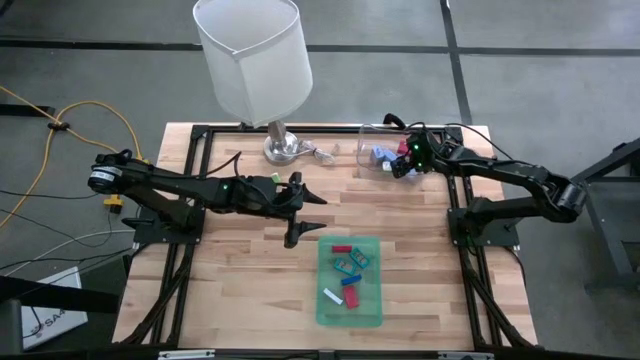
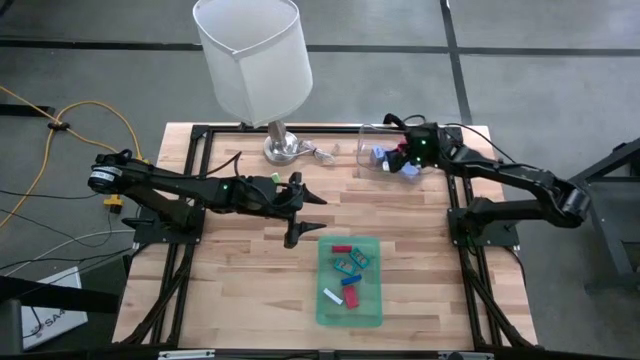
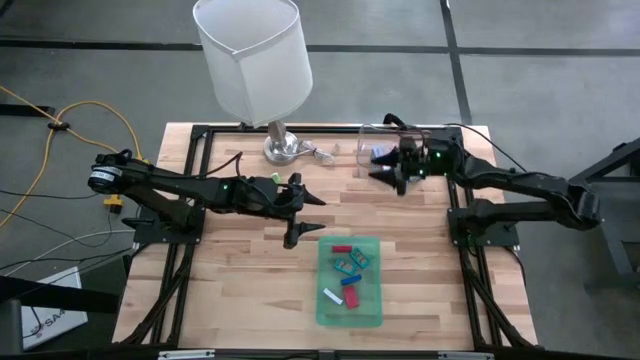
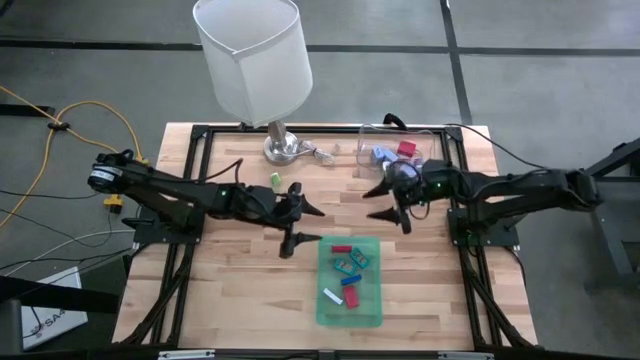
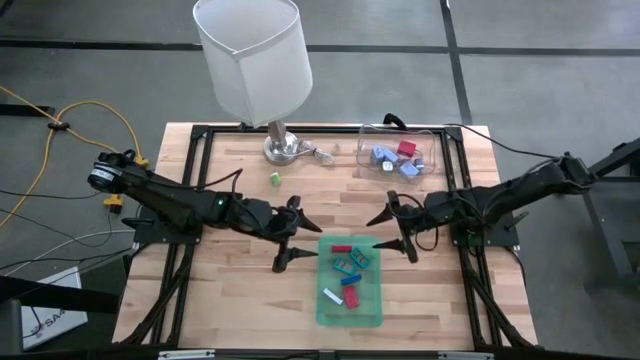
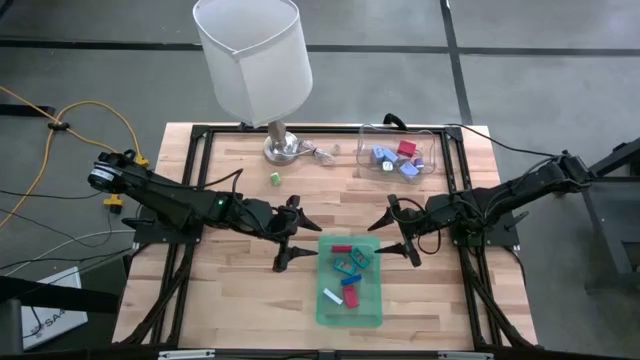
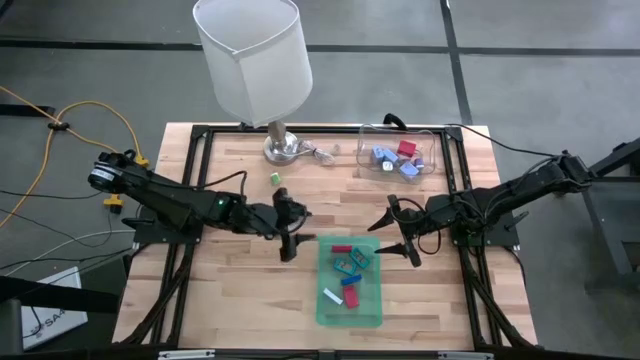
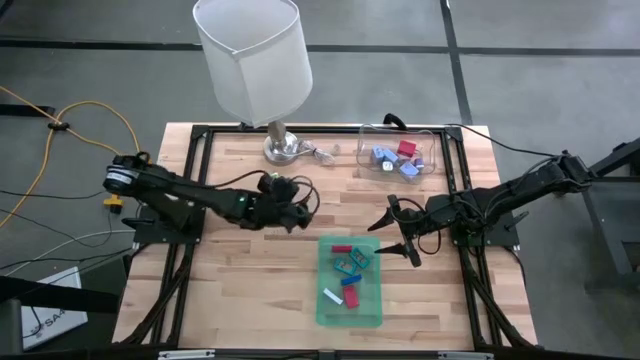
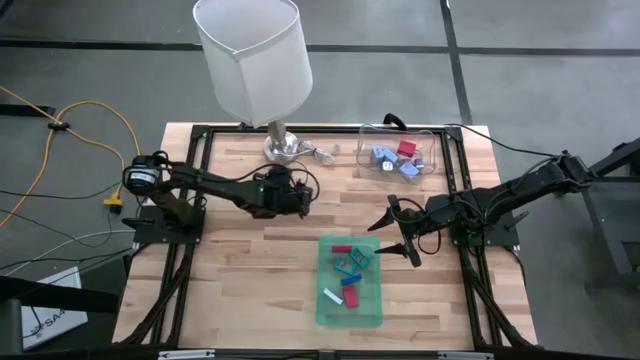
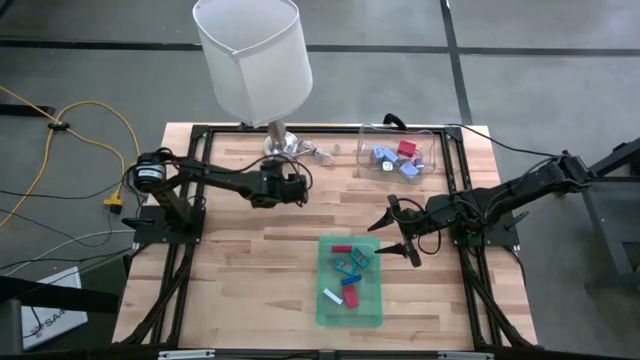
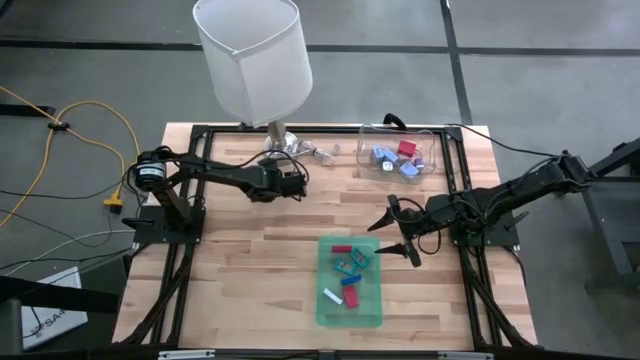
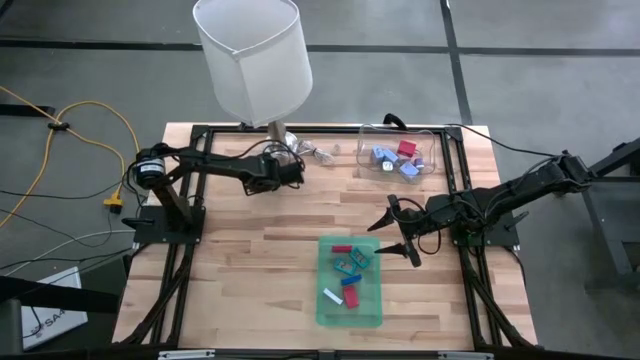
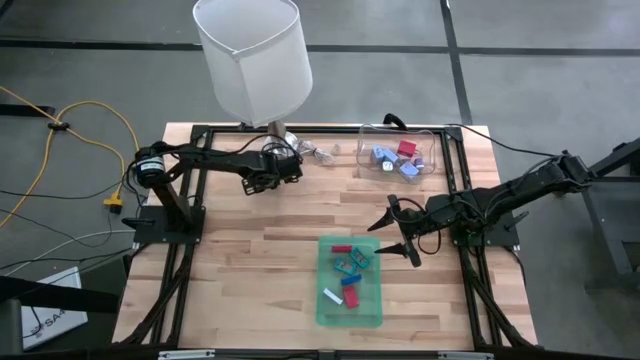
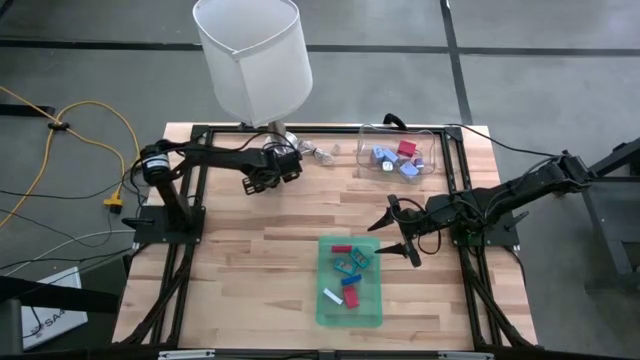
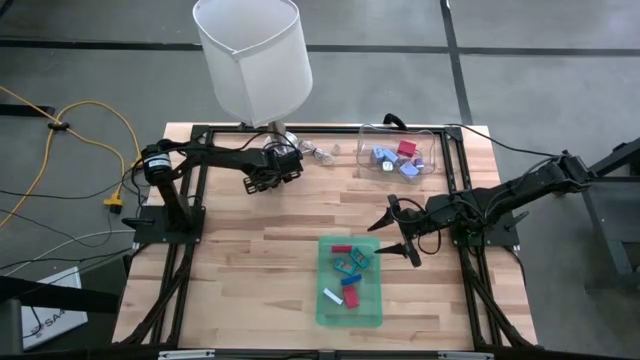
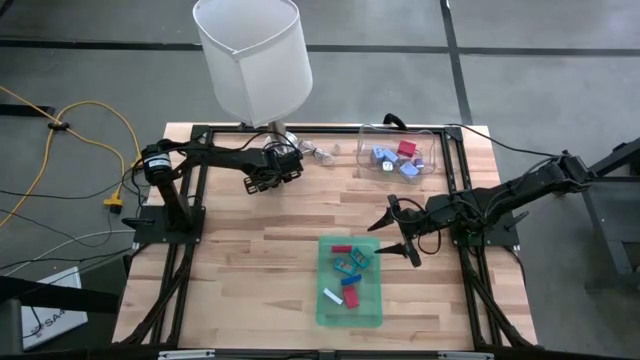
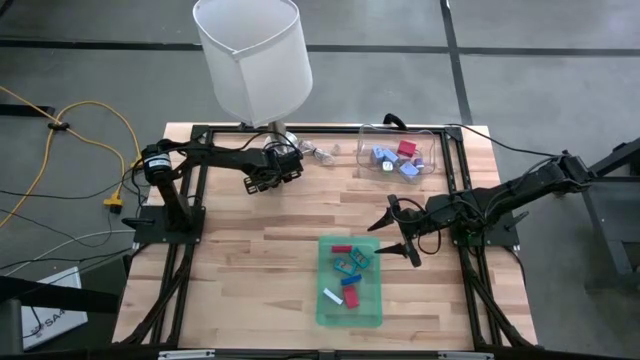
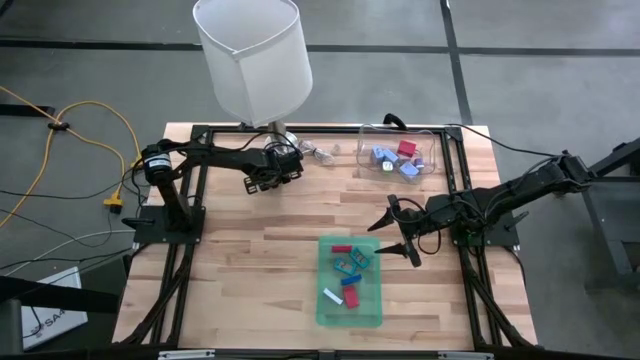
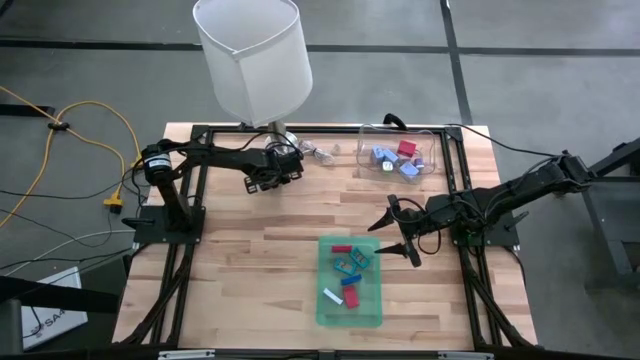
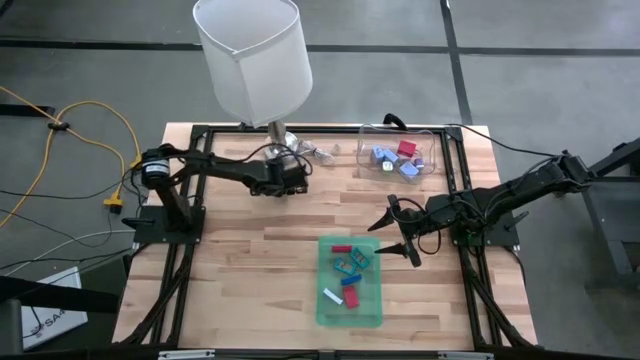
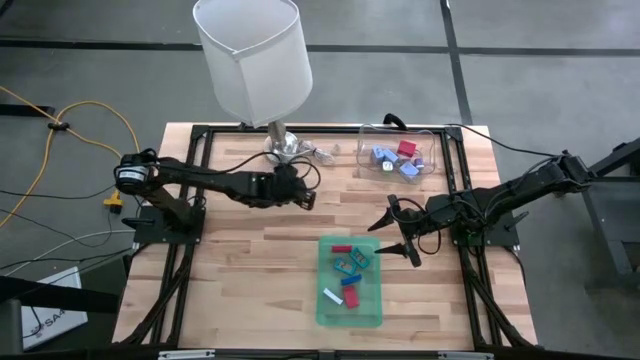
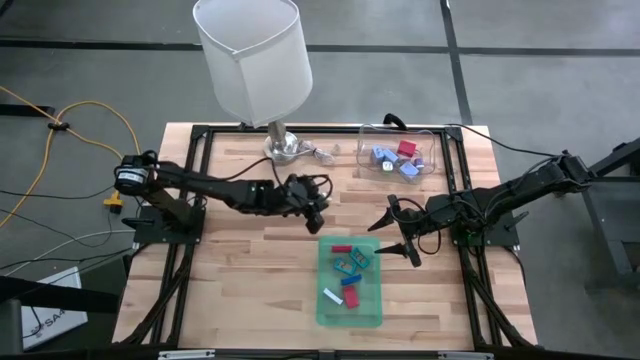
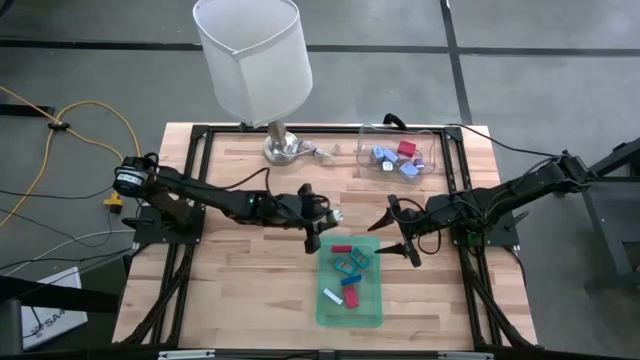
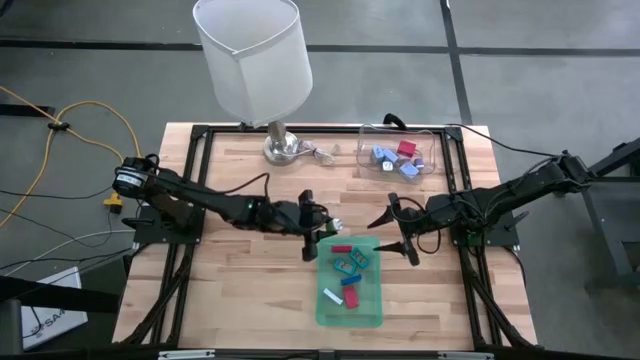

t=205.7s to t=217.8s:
Task: Pick & Place Office items
Put the green charger adapter into the transparent bin

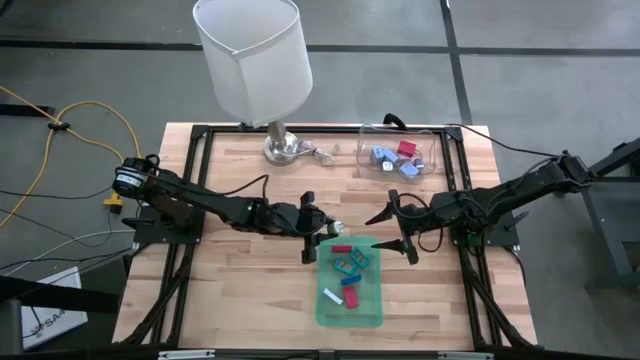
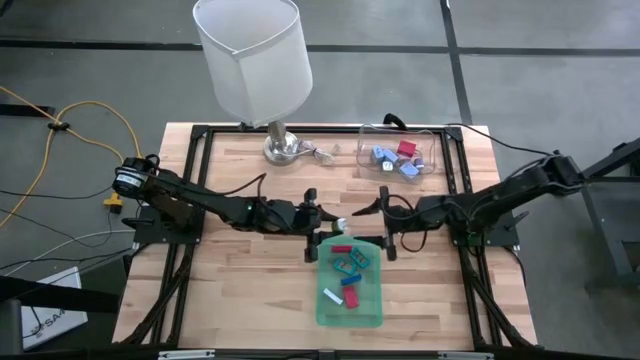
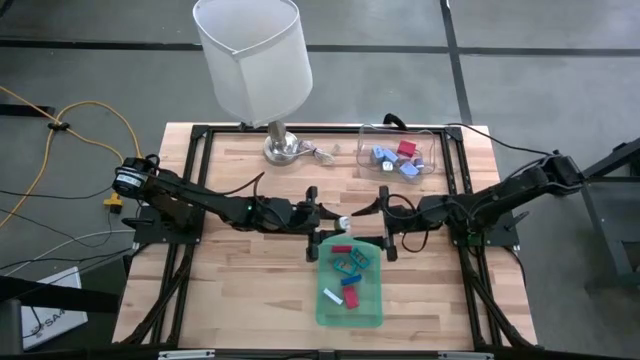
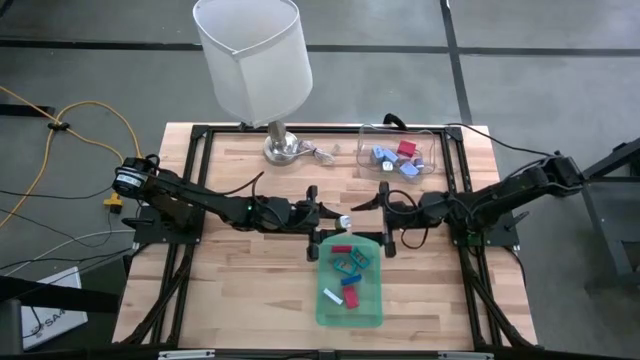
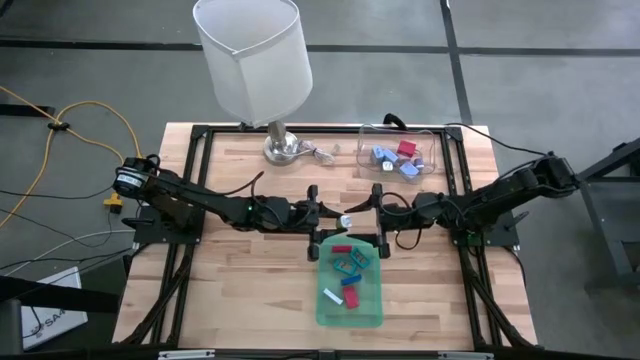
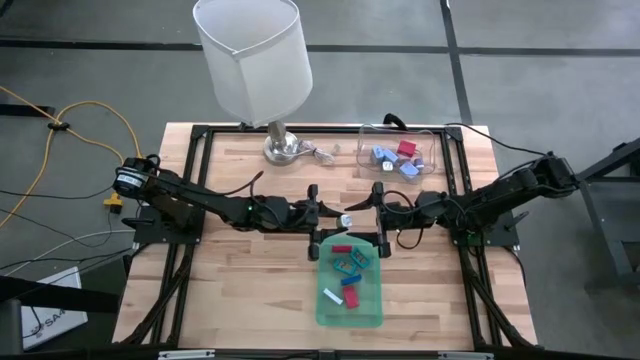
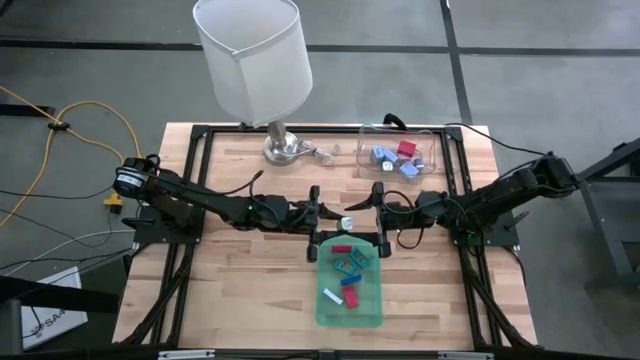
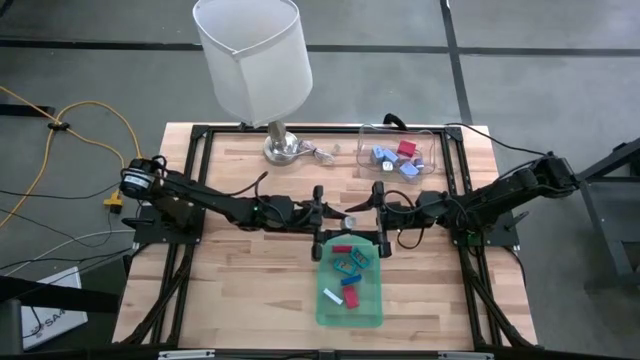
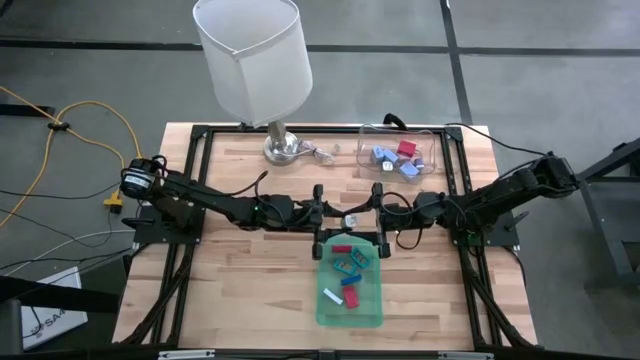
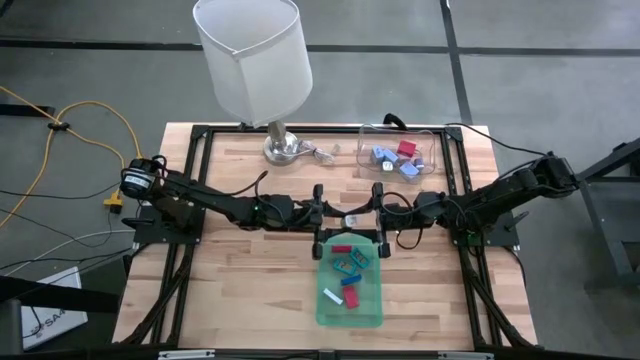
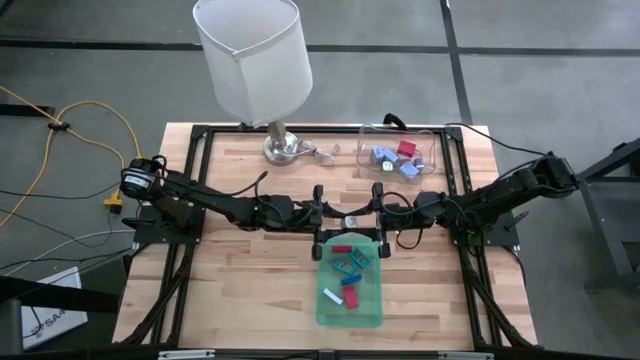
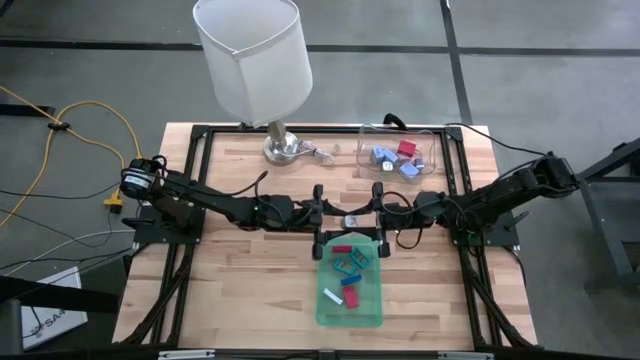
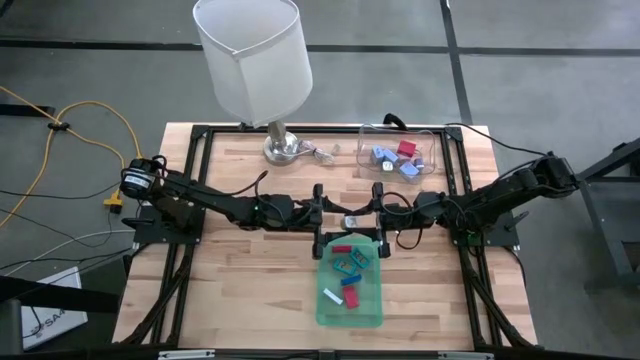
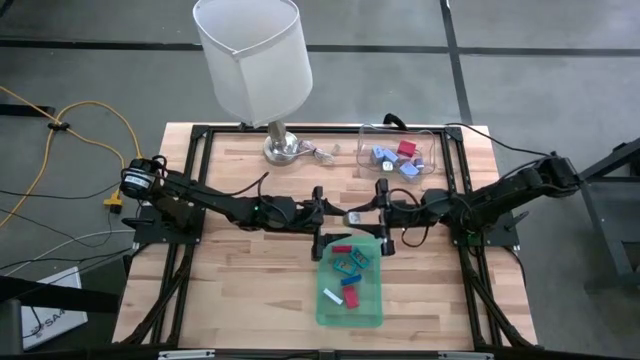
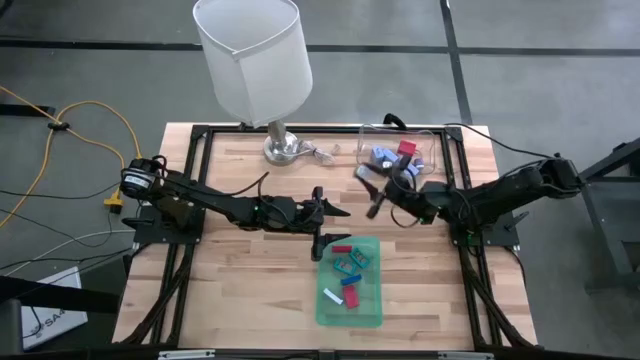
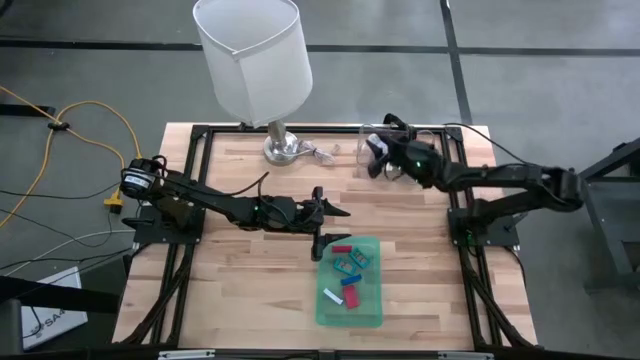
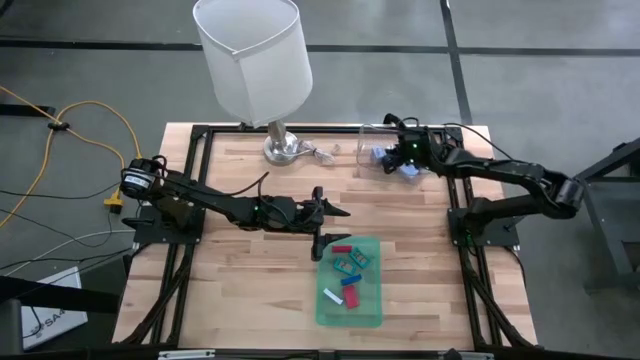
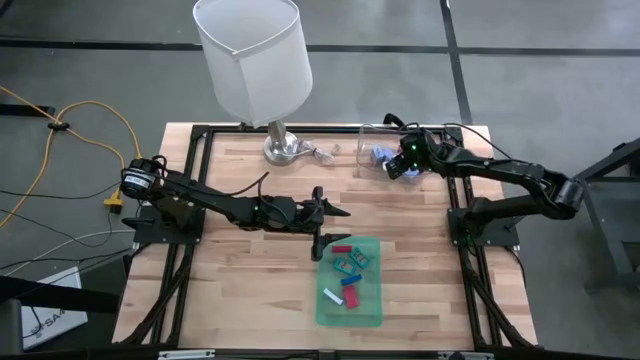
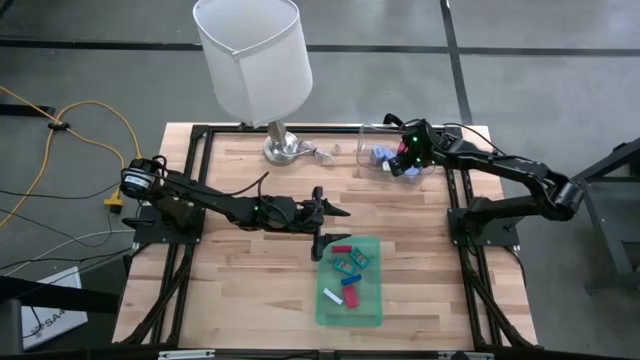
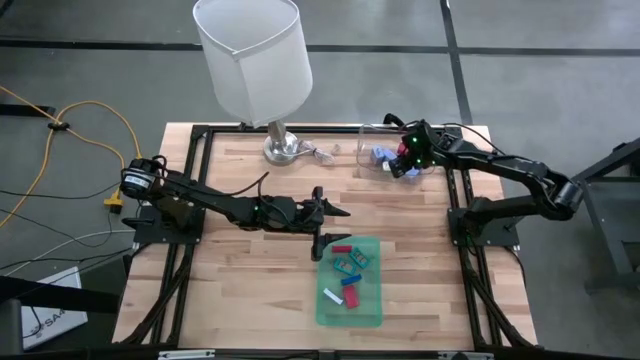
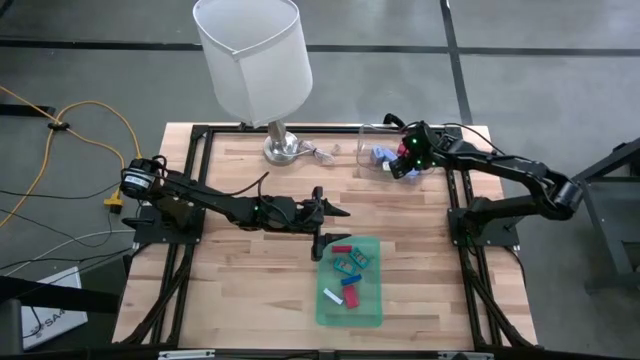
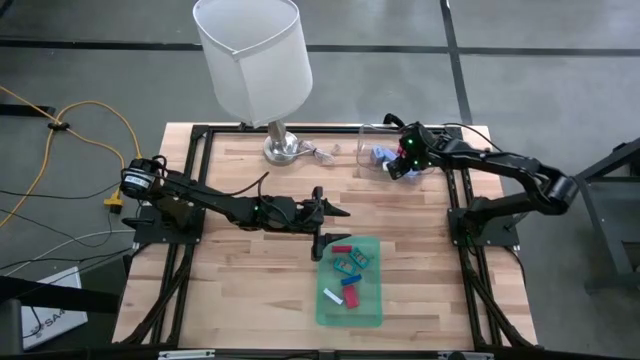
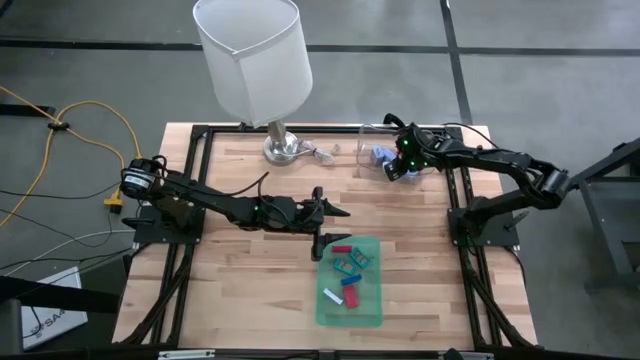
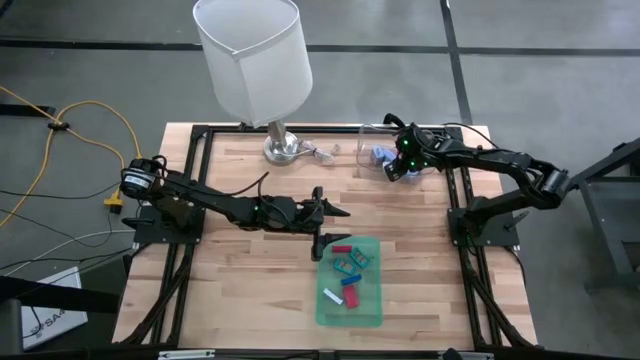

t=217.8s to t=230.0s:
Put the green charger adapter into the transparent bin
